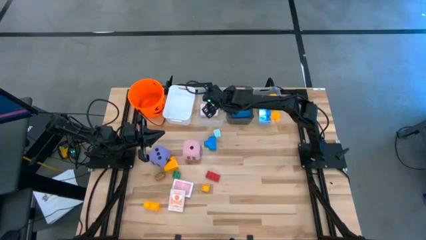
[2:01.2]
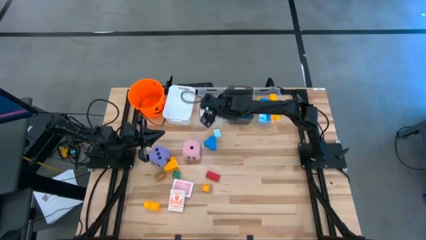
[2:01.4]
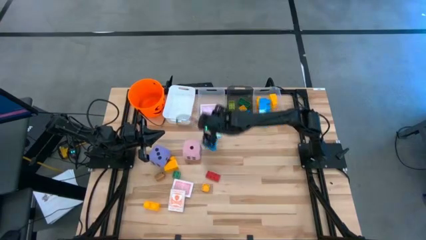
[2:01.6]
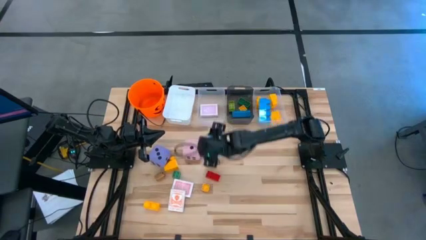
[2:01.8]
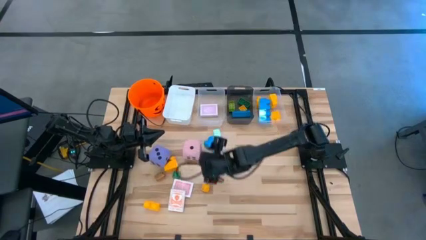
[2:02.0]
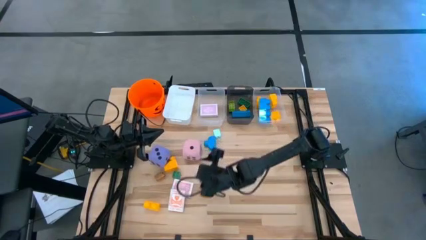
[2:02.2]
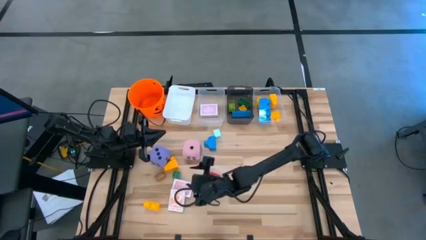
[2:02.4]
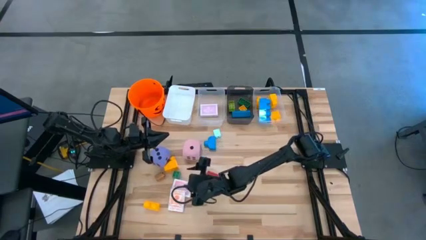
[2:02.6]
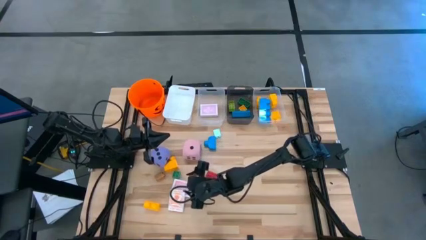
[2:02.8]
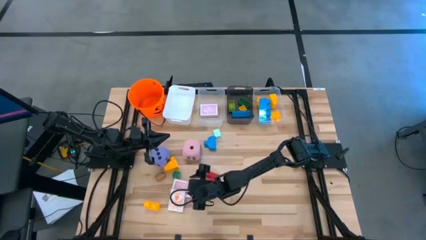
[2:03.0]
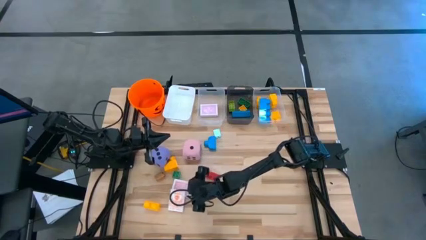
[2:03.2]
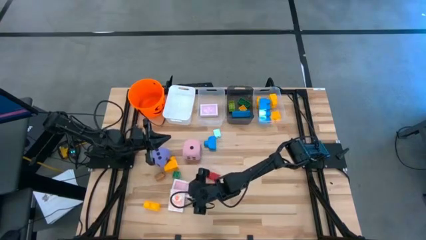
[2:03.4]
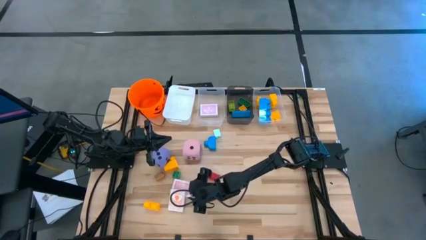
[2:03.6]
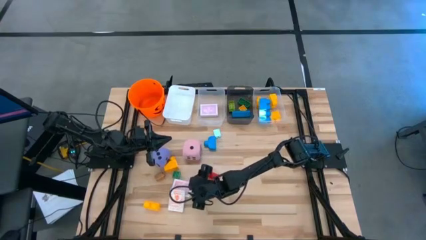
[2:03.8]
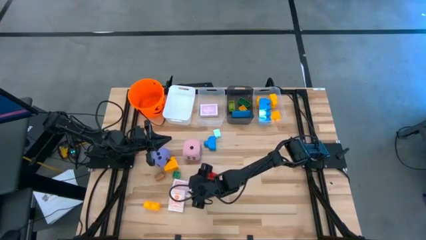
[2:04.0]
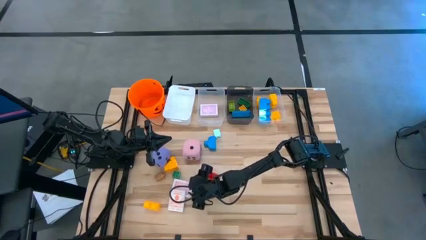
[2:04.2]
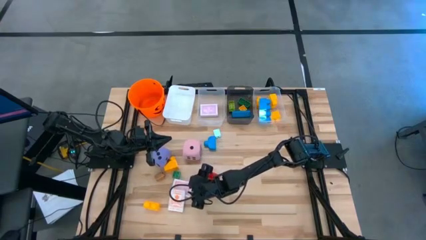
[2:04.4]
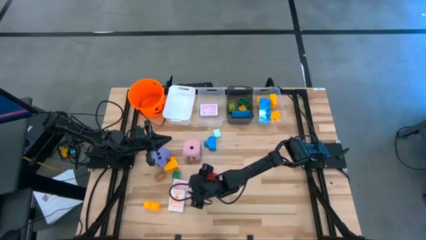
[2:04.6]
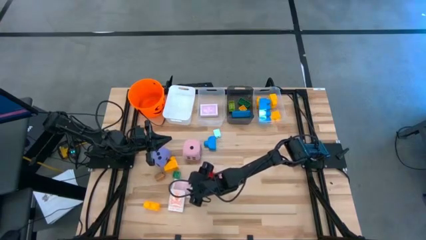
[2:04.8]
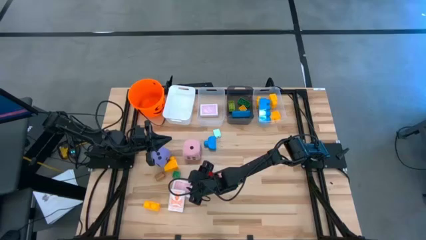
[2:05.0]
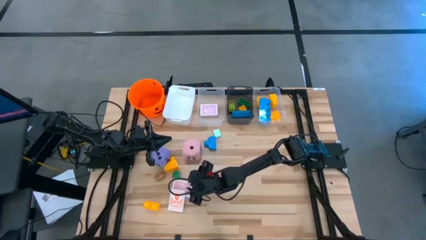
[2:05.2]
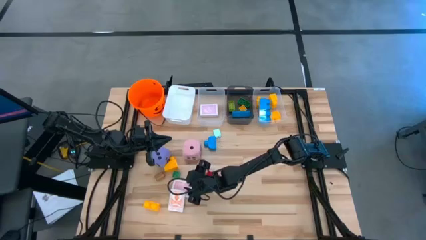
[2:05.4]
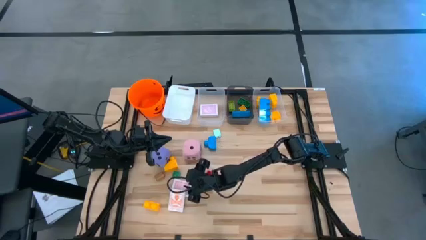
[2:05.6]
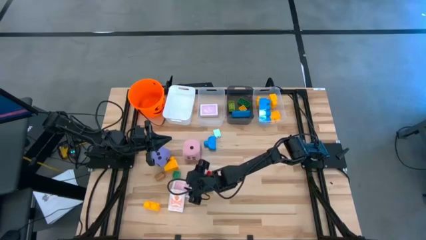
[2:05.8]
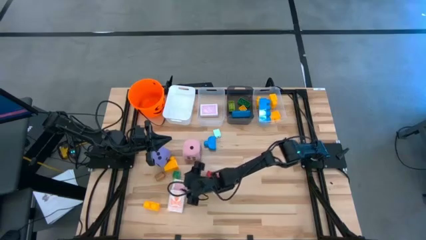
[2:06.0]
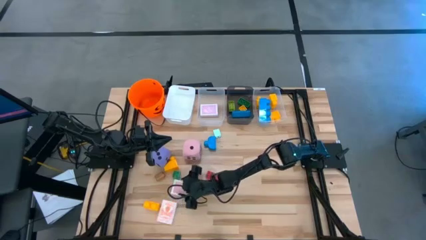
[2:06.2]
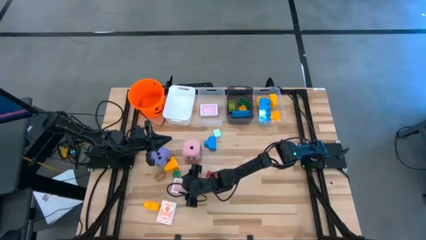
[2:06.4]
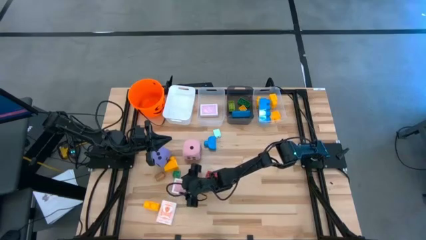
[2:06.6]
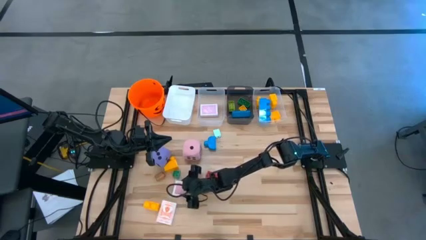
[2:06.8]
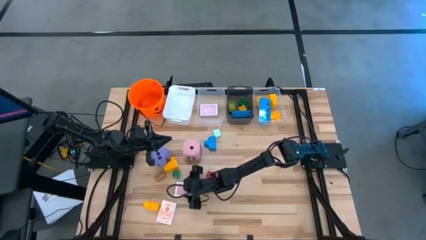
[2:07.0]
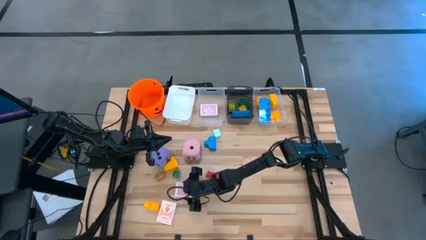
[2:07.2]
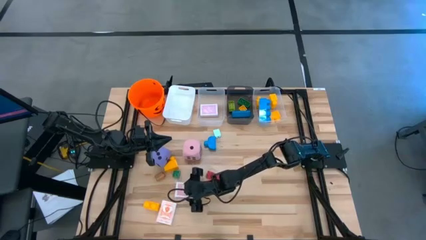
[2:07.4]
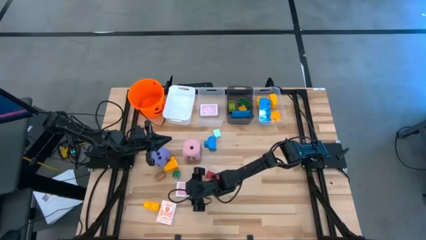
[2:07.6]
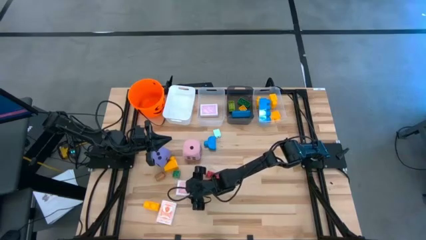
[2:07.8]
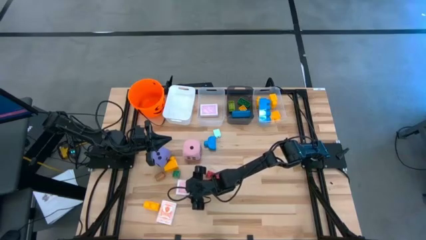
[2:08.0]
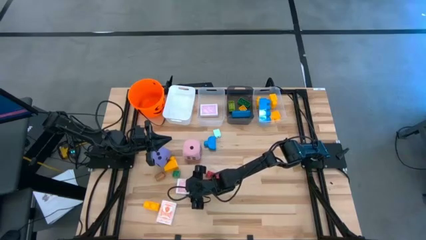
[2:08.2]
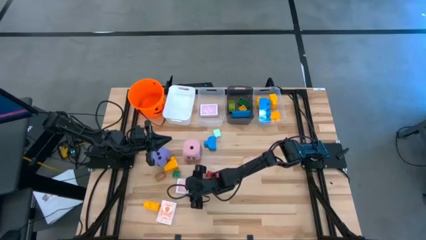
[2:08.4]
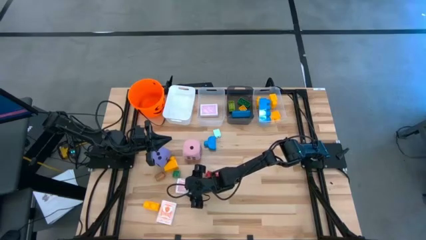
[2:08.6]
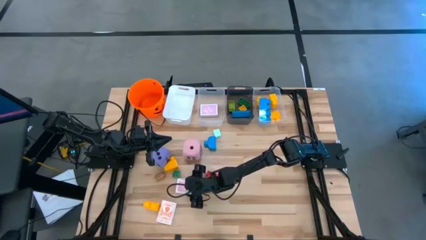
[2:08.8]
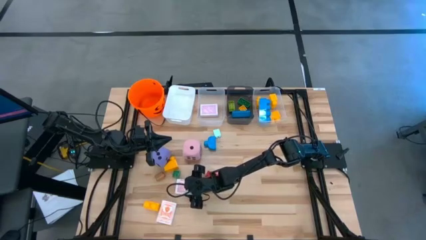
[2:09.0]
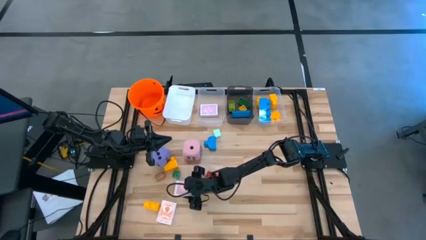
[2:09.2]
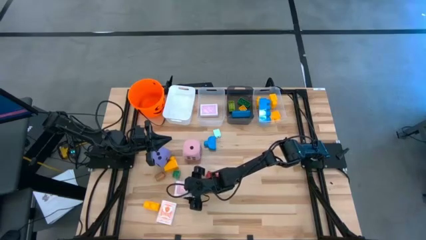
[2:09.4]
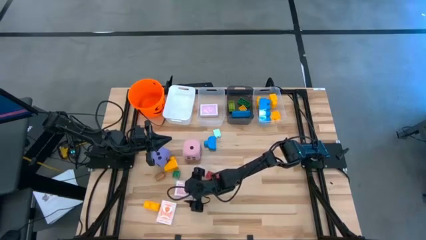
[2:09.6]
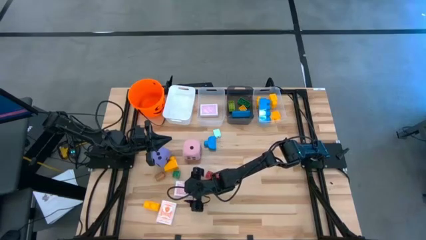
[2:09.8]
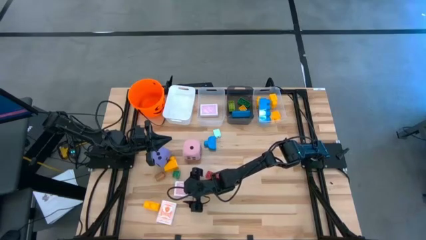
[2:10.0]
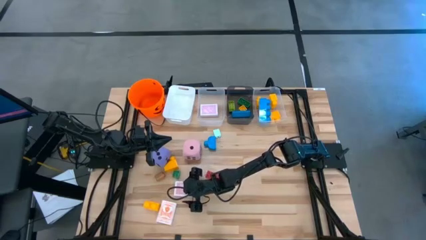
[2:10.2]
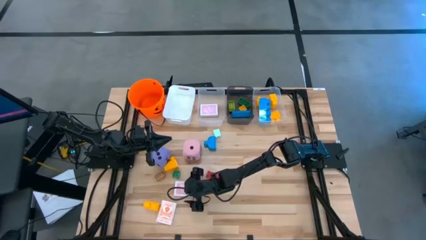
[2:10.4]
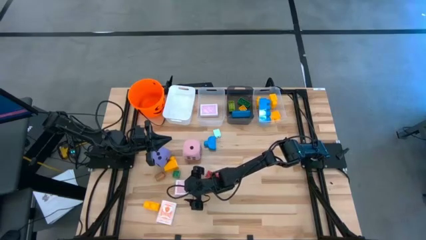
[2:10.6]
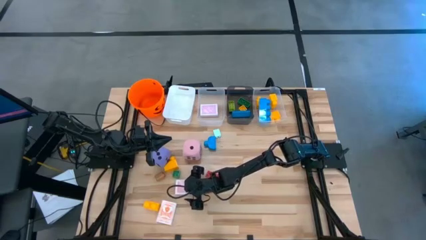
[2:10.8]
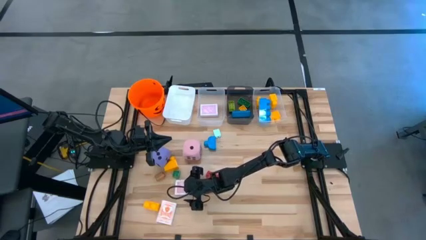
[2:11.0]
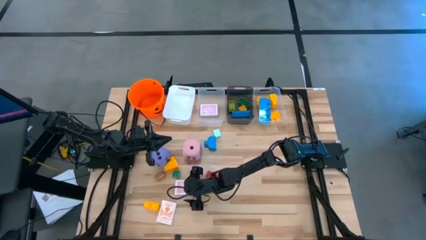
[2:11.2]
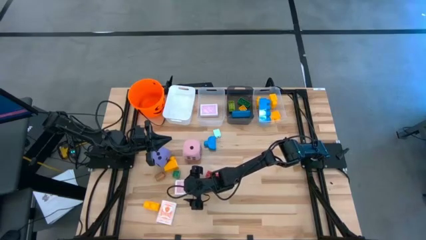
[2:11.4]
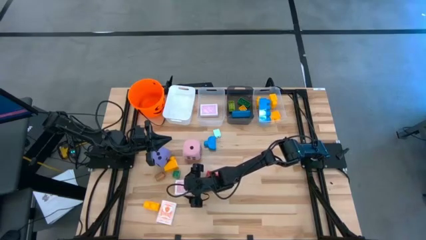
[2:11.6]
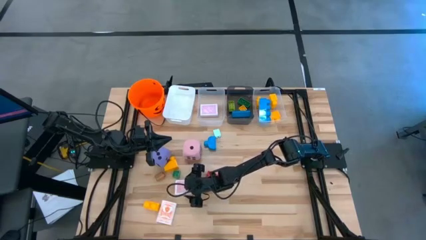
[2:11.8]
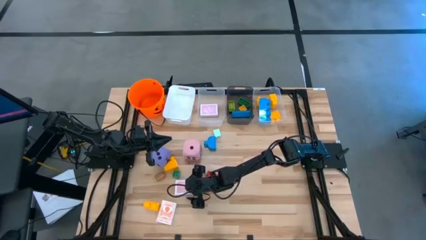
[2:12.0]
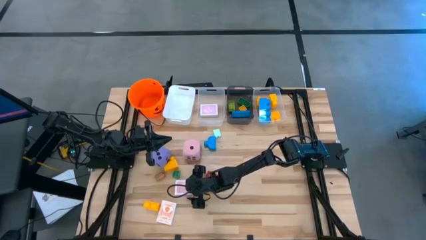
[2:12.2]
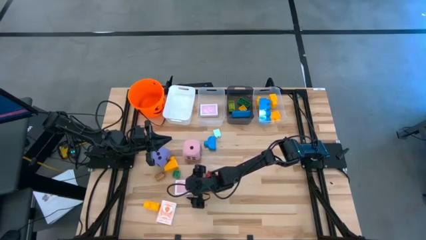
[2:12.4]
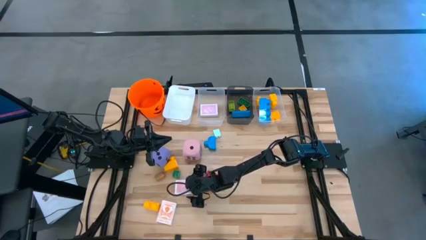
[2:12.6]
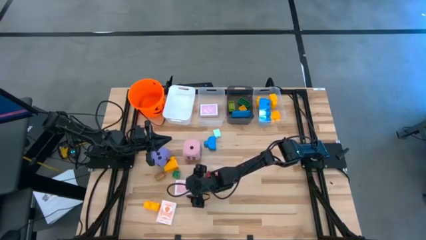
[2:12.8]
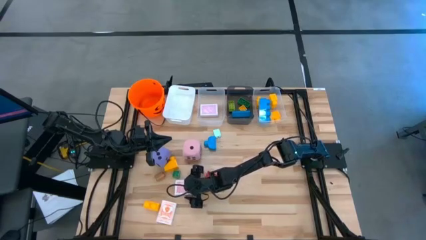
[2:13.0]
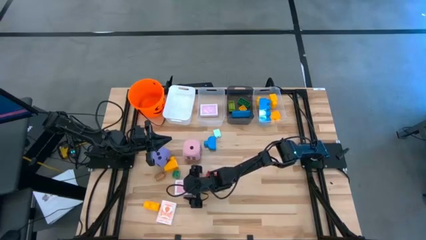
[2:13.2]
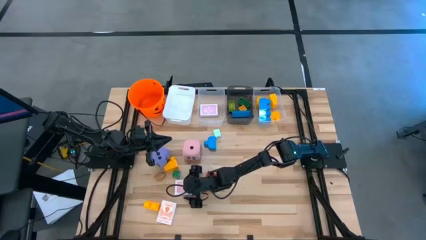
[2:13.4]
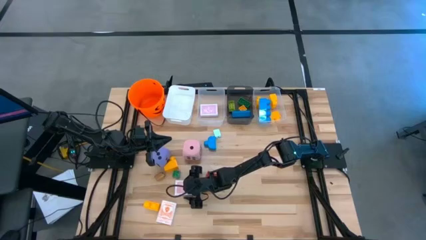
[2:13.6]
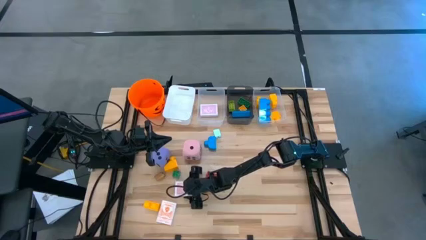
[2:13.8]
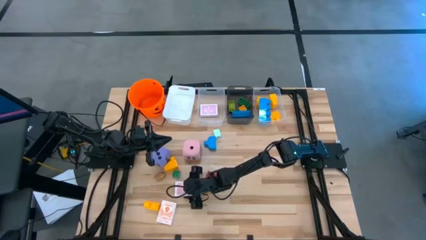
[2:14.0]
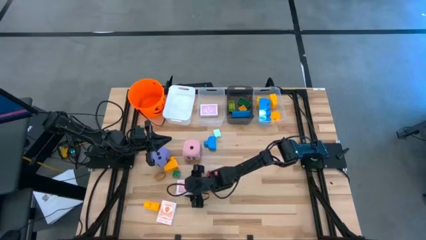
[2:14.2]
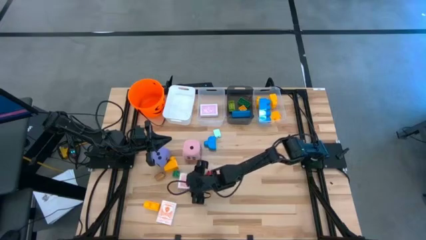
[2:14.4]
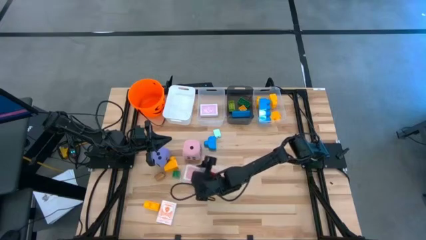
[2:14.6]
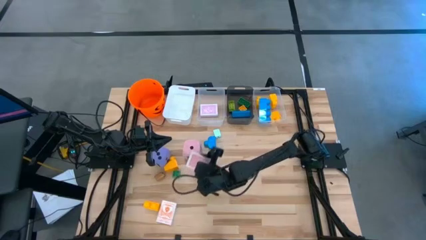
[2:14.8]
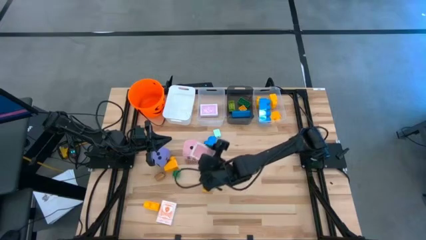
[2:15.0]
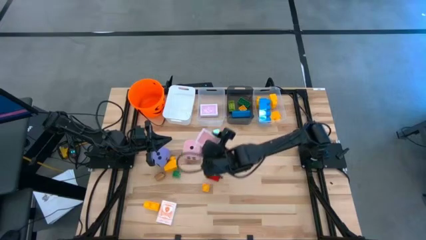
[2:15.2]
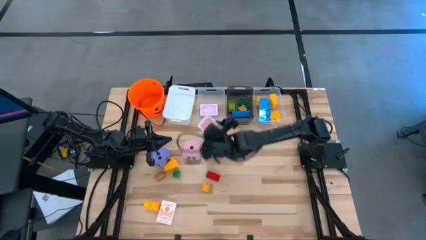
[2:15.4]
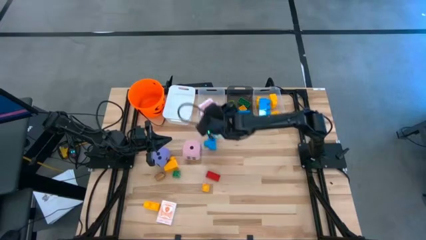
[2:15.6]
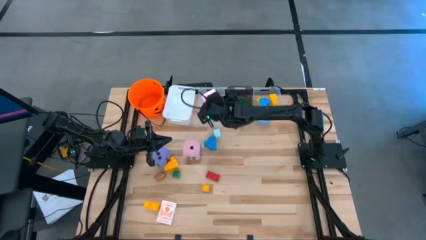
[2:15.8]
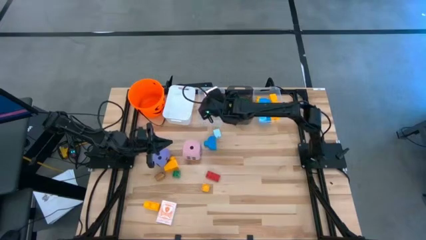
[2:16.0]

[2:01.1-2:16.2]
Task: Pick & Place Toys
Put the red game card into the left transparent bin
